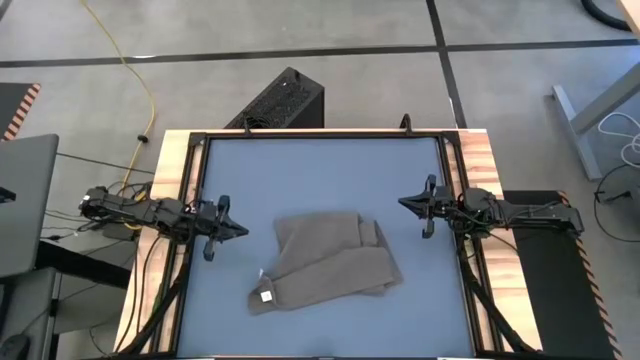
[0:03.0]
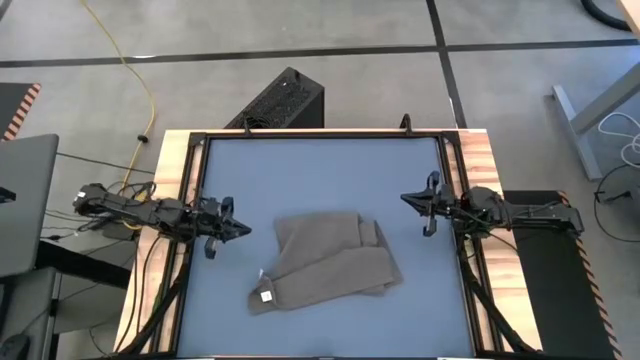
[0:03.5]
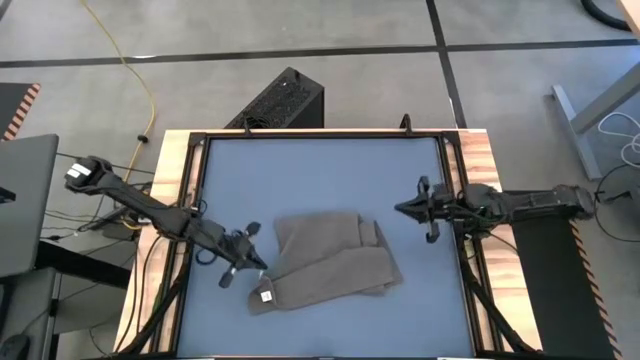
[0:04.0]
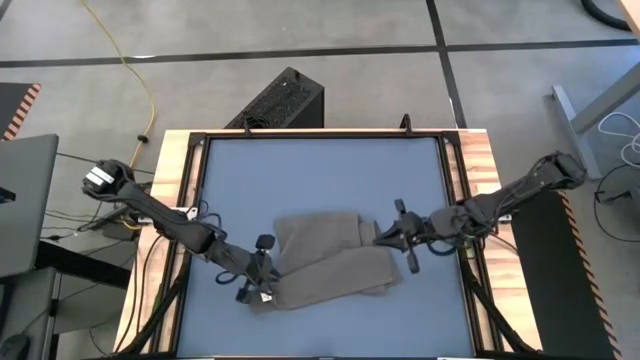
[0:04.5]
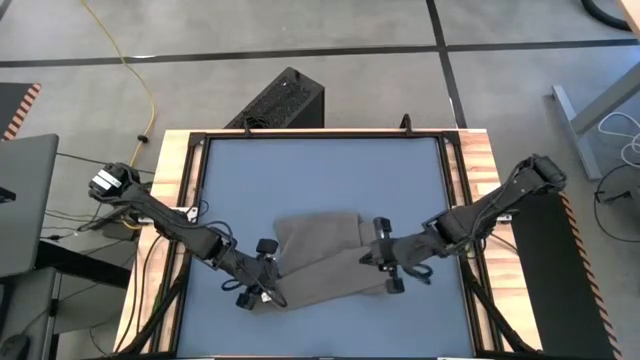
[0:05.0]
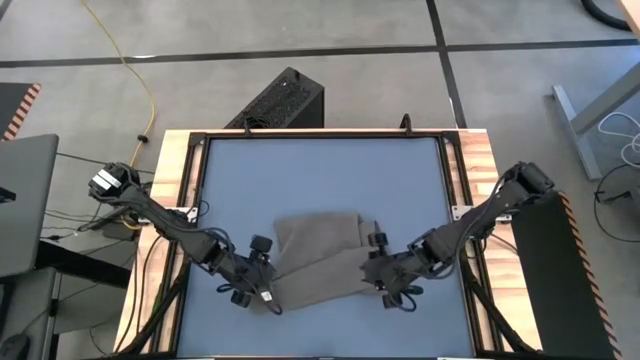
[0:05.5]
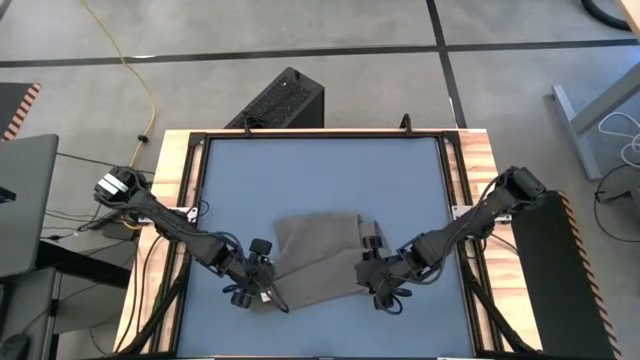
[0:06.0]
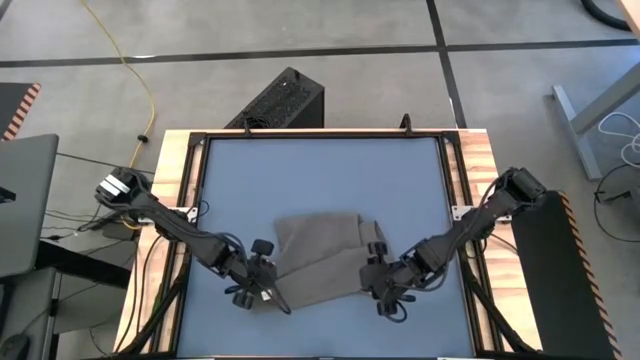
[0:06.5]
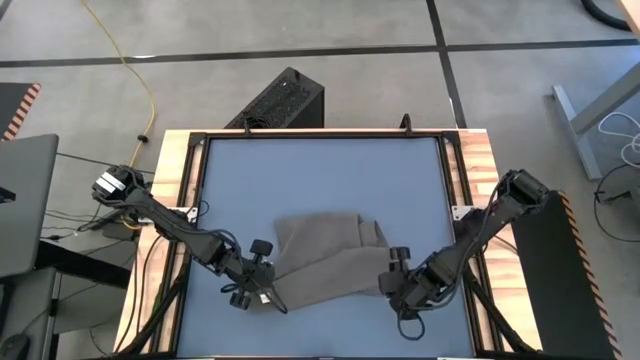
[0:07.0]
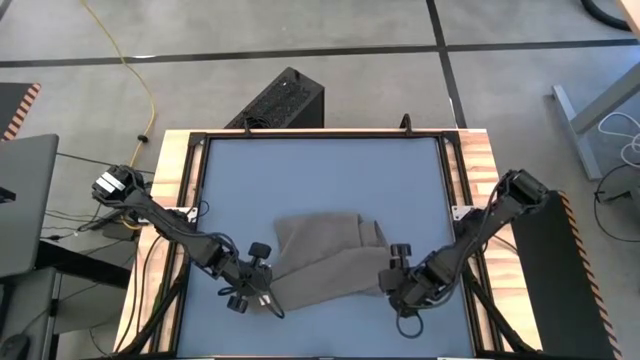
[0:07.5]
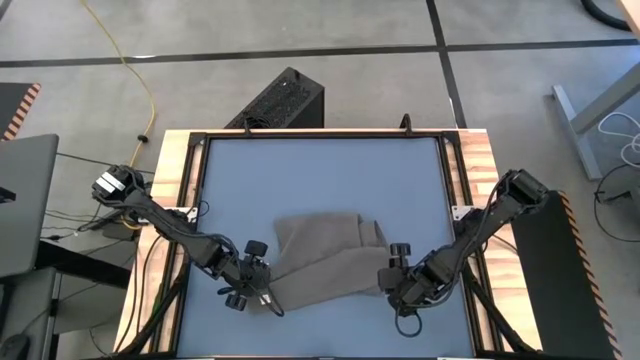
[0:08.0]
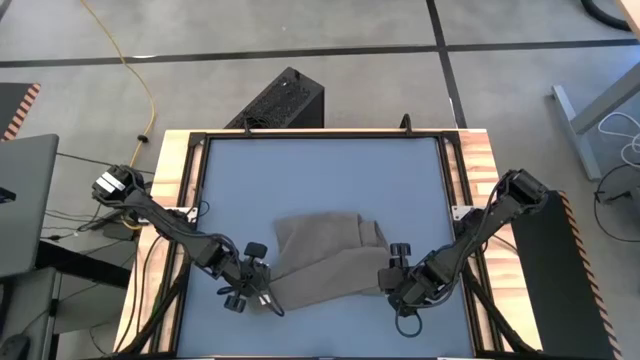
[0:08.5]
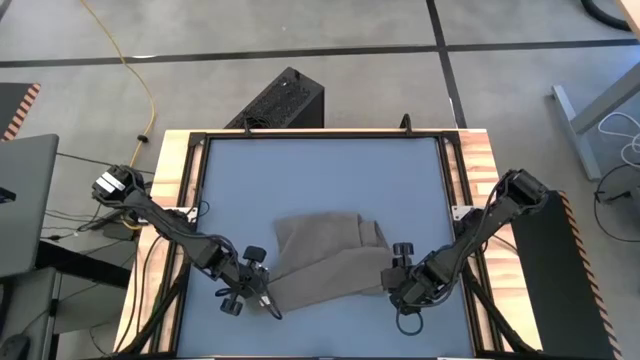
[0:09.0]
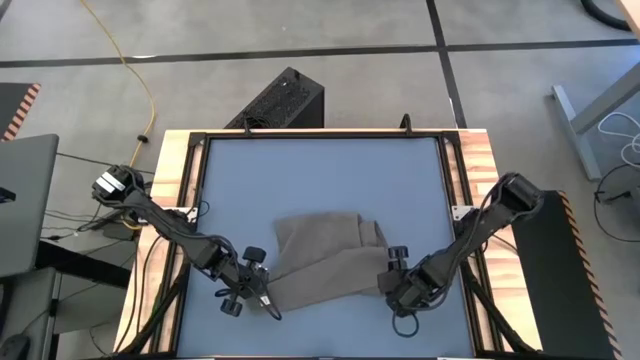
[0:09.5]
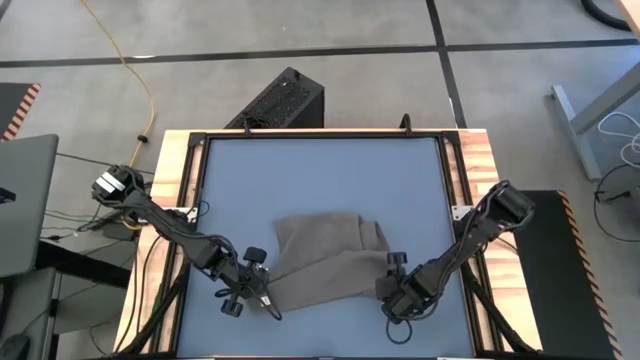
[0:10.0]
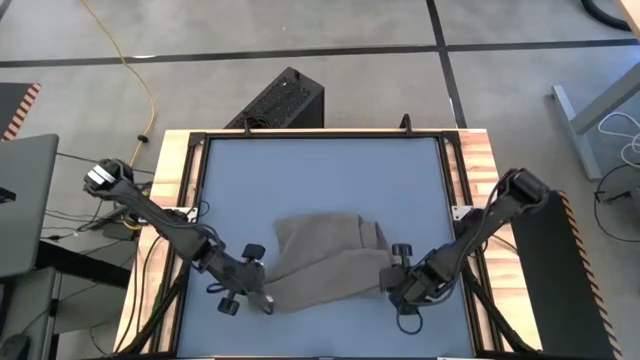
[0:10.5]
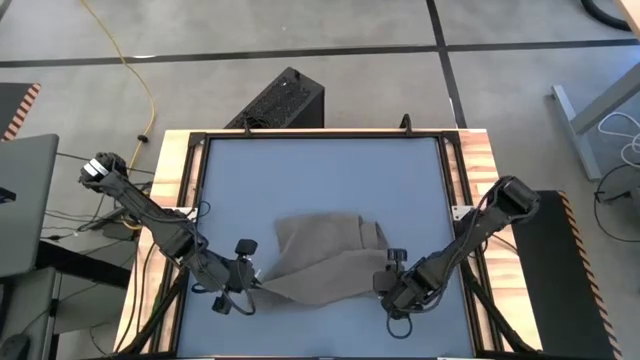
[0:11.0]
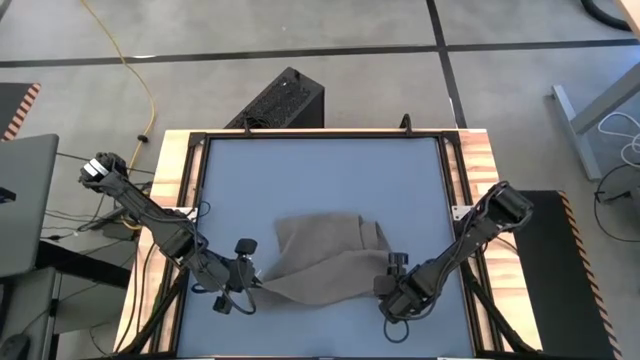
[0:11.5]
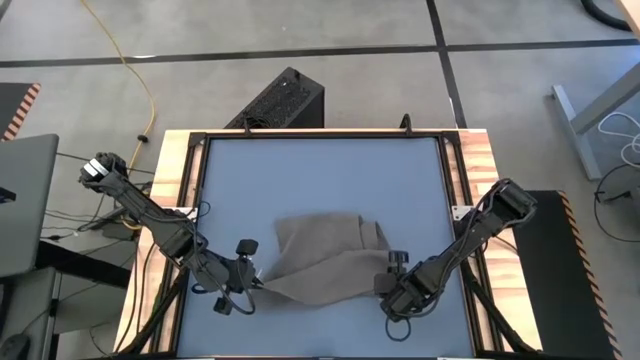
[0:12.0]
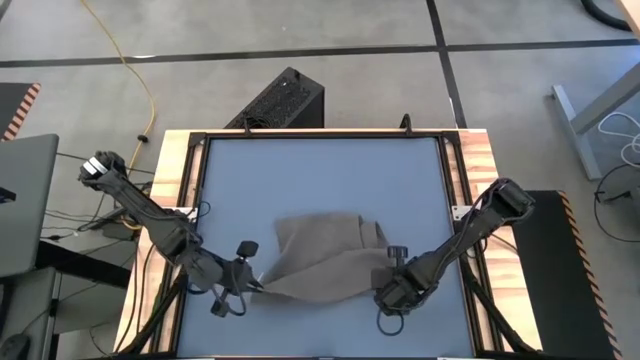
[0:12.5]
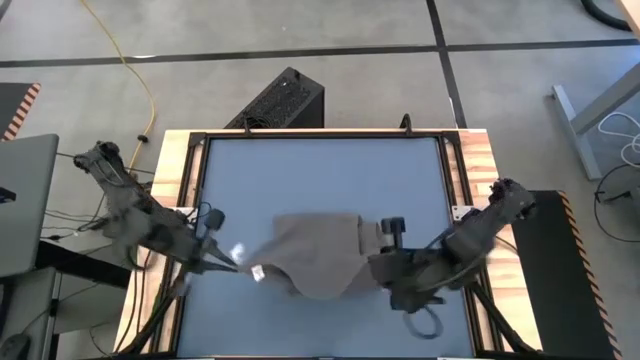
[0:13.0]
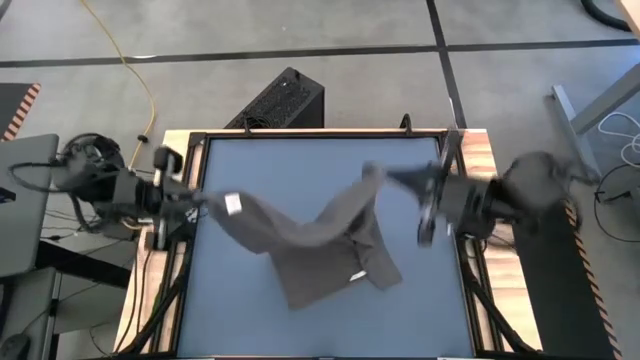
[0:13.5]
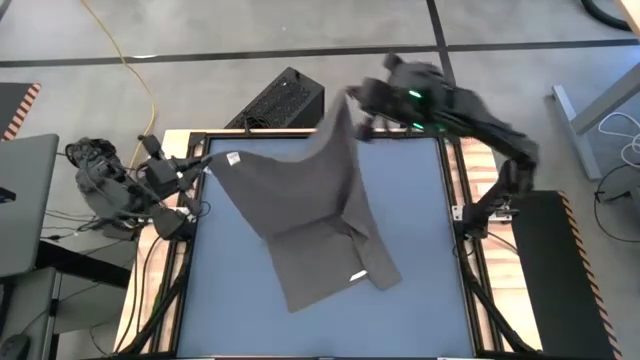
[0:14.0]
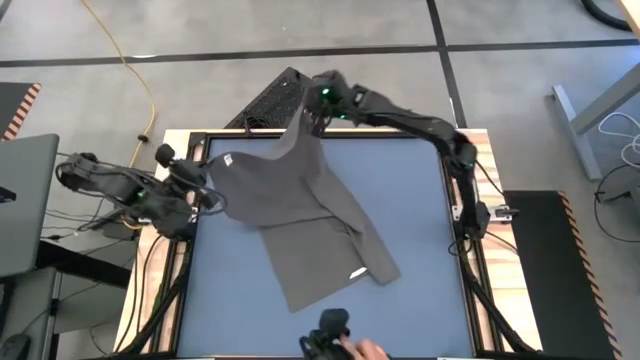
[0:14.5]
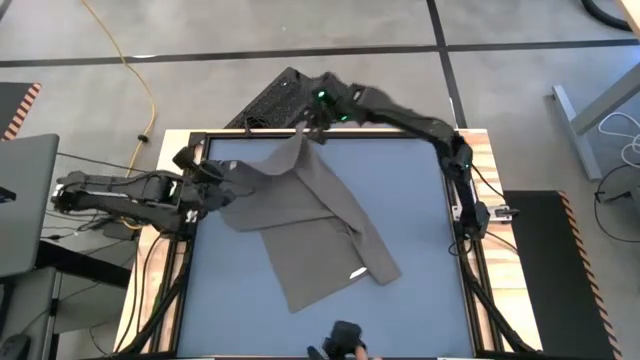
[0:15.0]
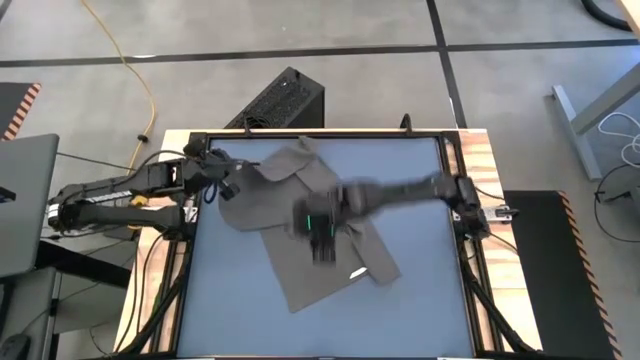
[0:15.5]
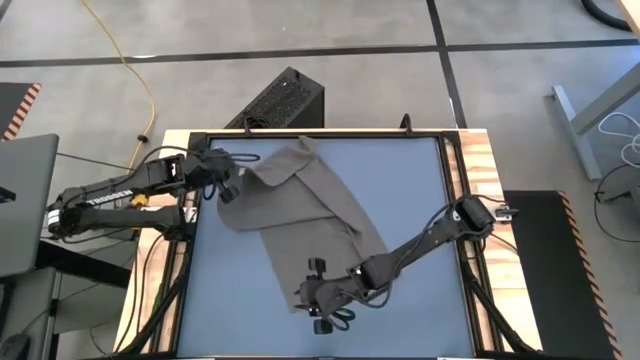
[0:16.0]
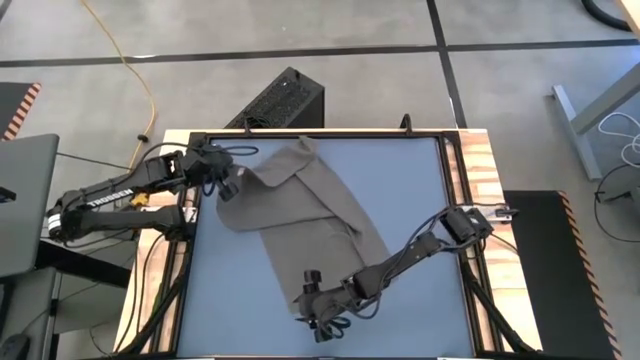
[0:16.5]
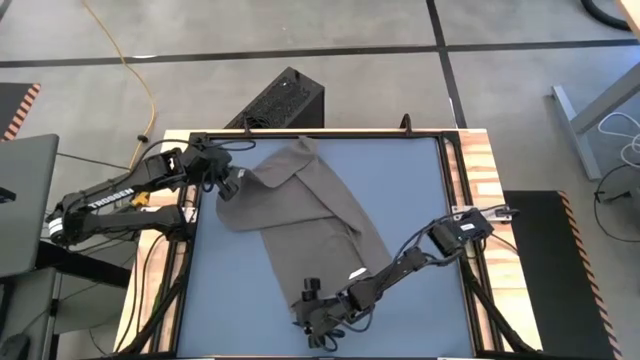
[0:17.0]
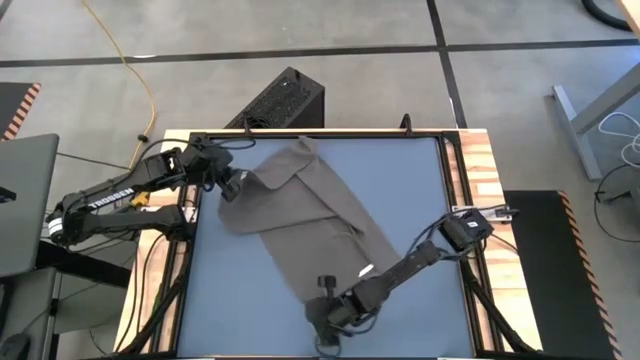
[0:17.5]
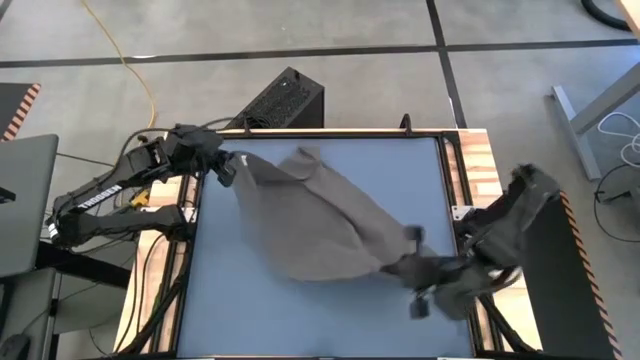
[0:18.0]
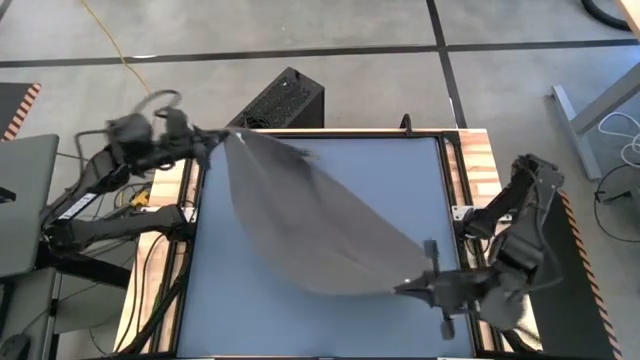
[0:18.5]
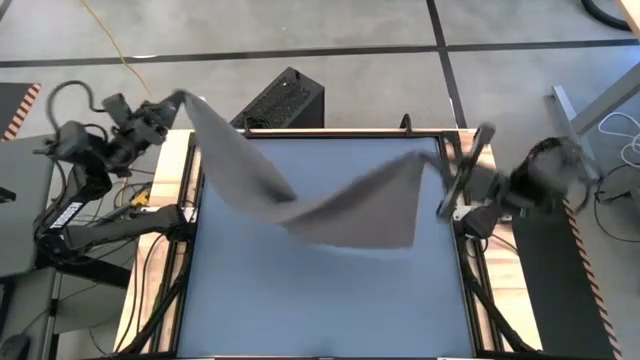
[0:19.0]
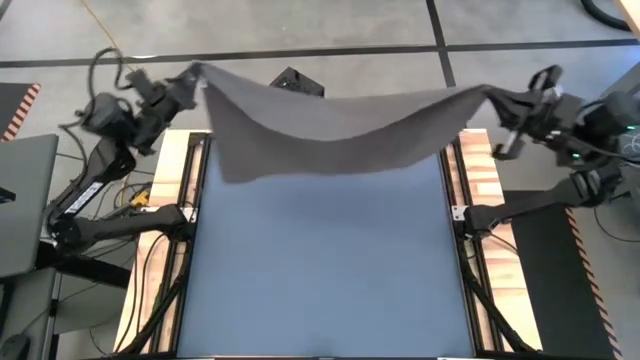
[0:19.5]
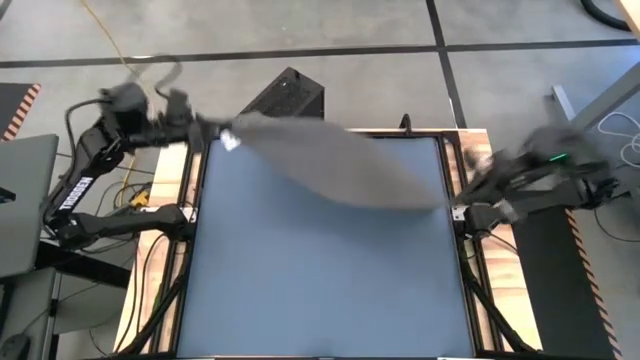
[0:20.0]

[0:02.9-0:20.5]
Task: Roll towel
Roll the gray towel

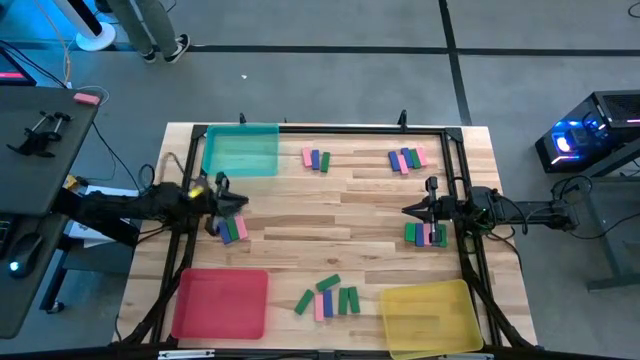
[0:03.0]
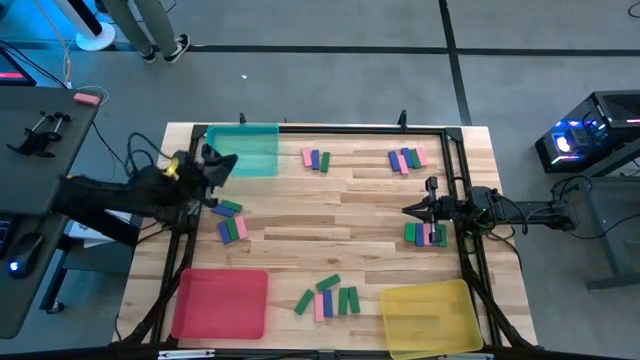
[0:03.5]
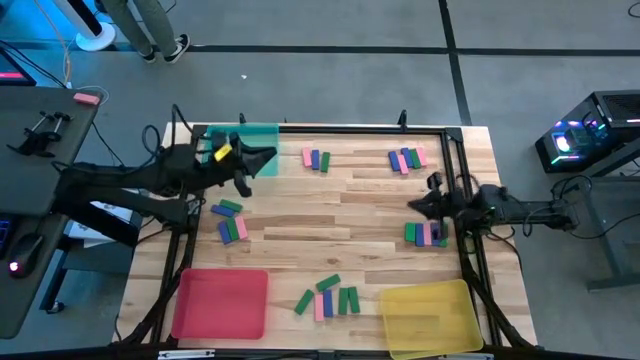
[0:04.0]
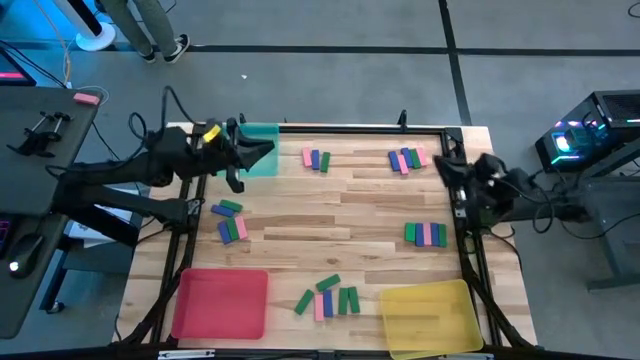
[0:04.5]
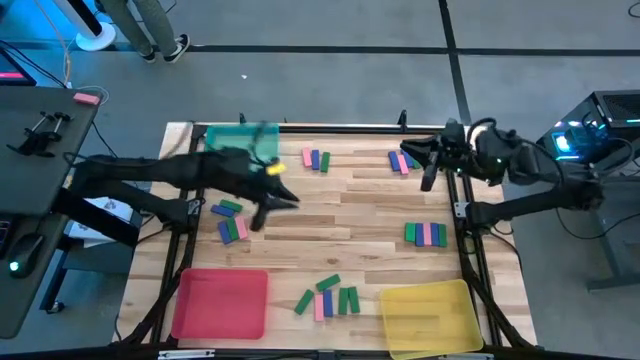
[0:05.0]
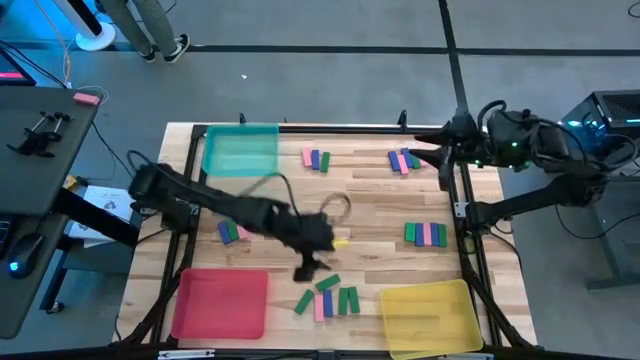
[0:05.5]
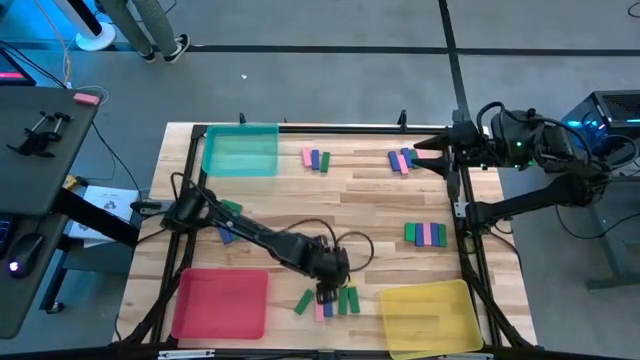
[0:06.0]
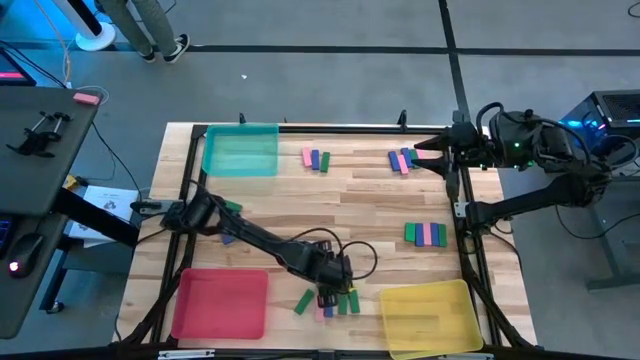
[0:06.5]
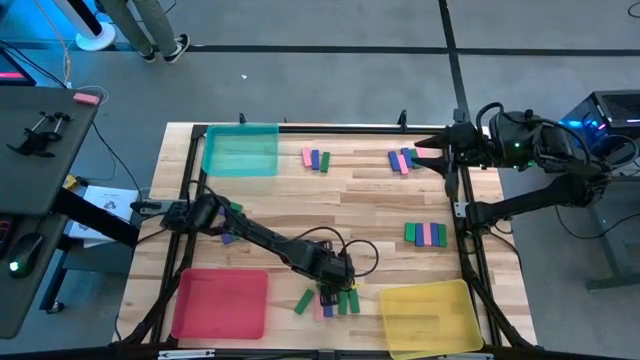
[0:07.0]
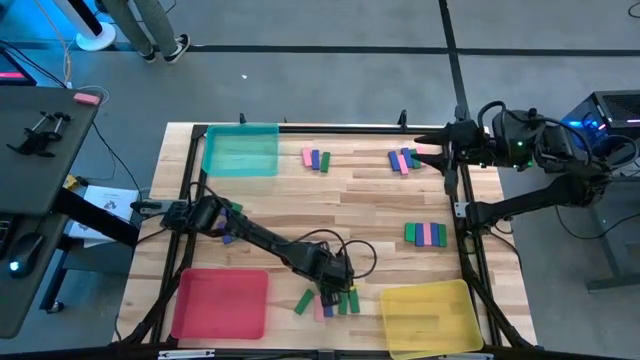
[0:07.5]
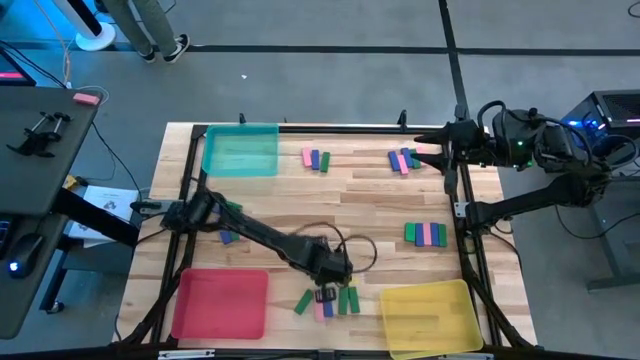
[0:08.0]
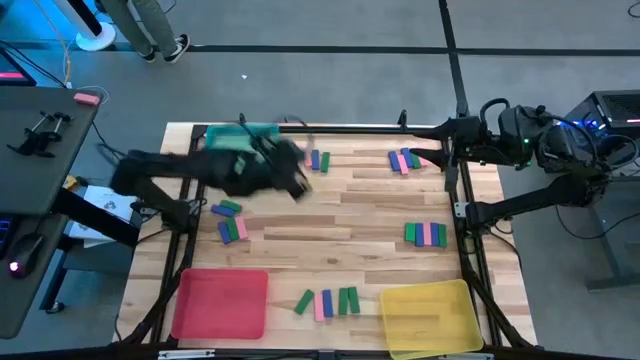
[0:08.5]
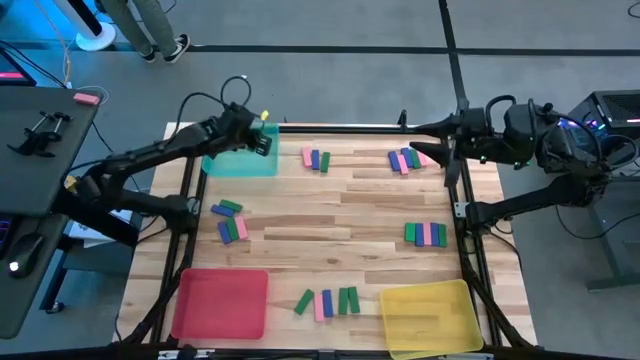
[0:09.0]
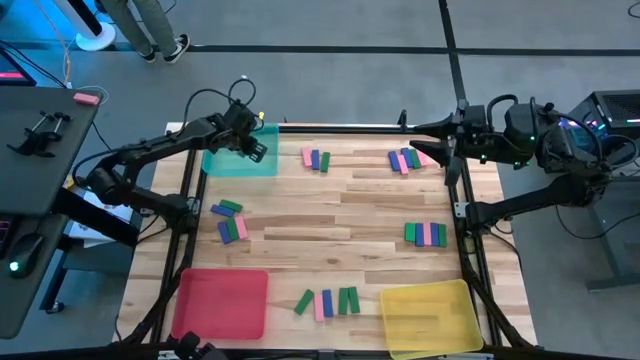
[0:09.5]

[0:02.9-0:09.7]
Task: Sort blocks
Put the green block into the blue bin
